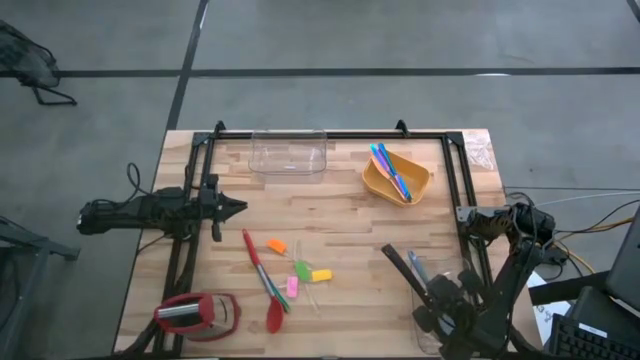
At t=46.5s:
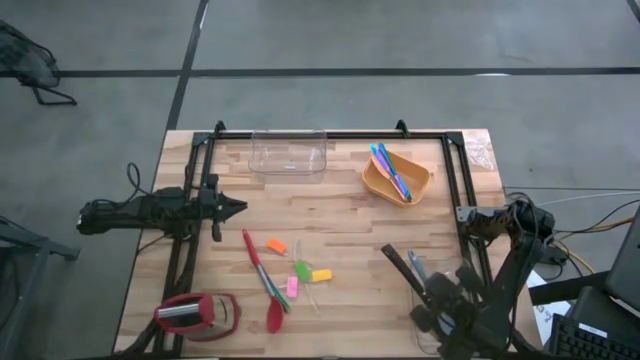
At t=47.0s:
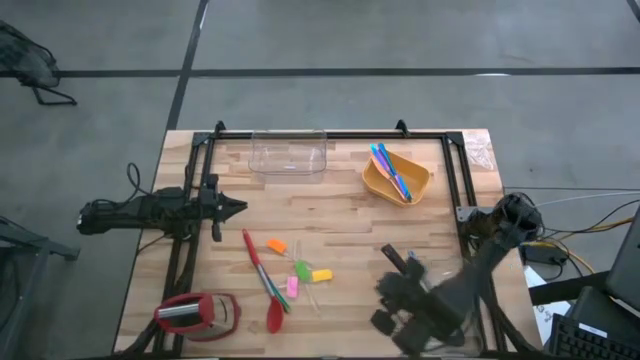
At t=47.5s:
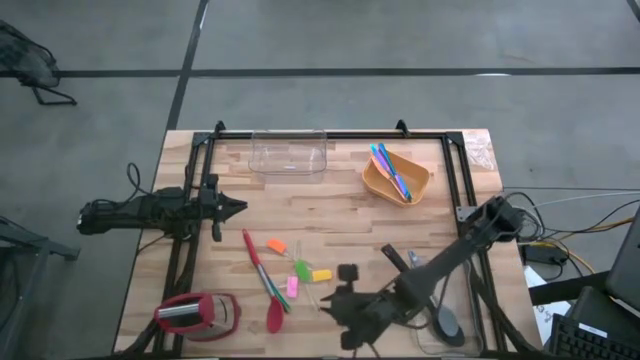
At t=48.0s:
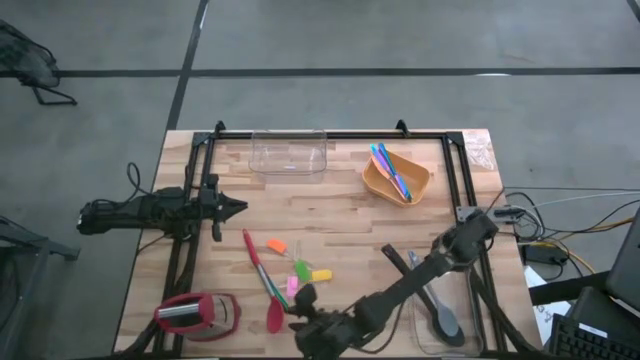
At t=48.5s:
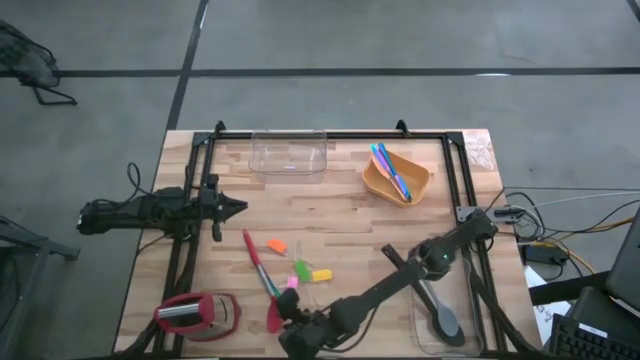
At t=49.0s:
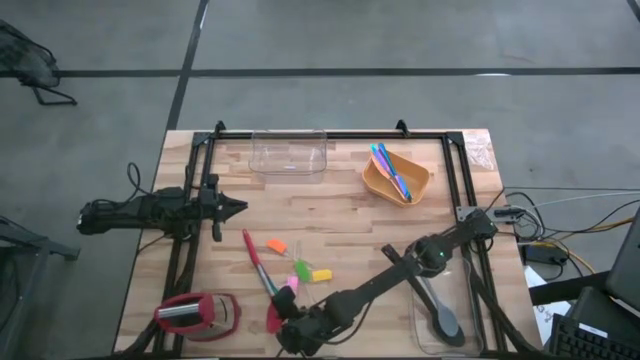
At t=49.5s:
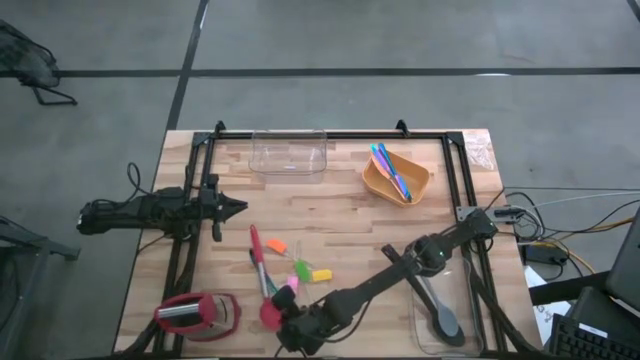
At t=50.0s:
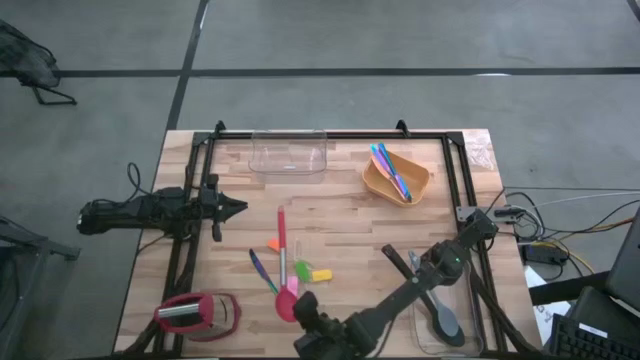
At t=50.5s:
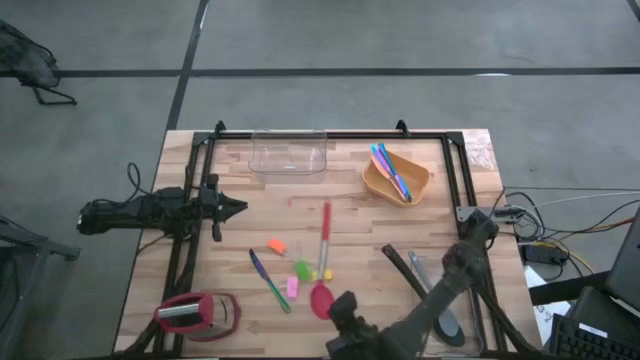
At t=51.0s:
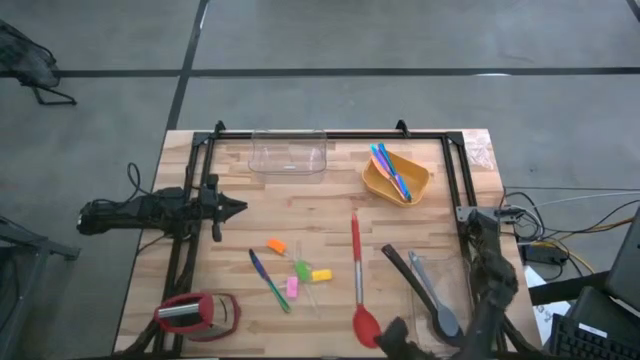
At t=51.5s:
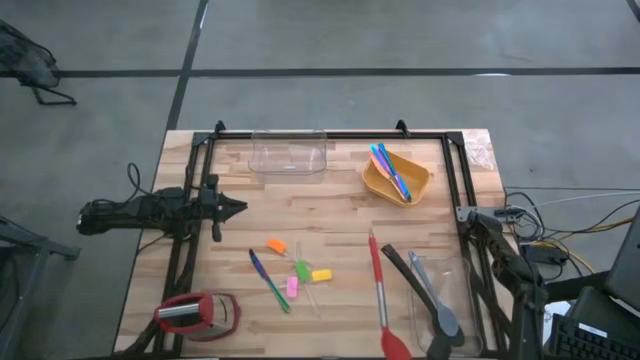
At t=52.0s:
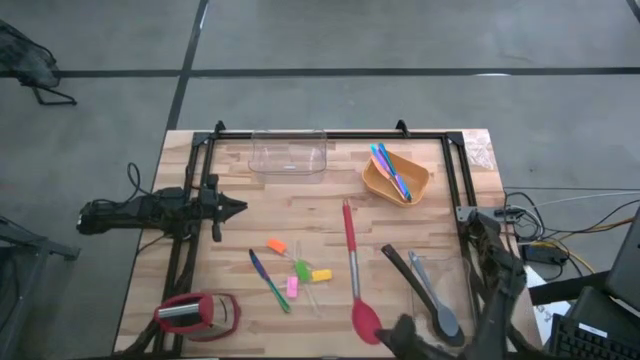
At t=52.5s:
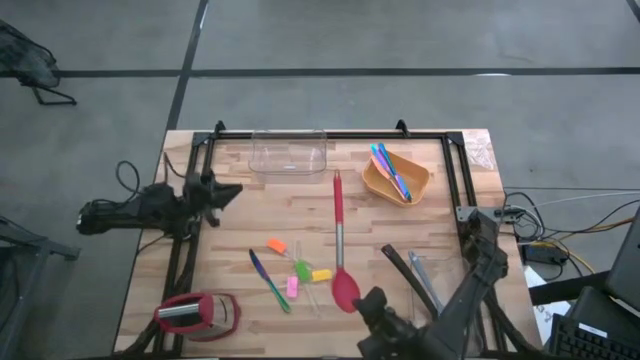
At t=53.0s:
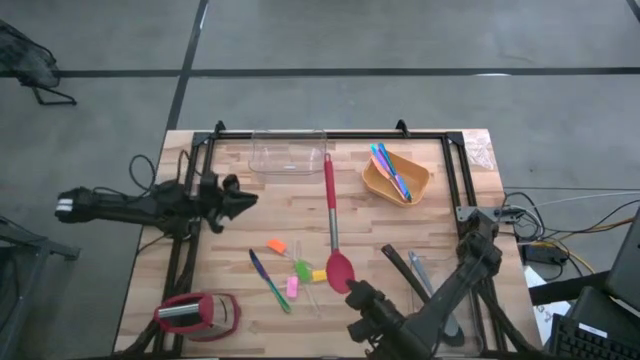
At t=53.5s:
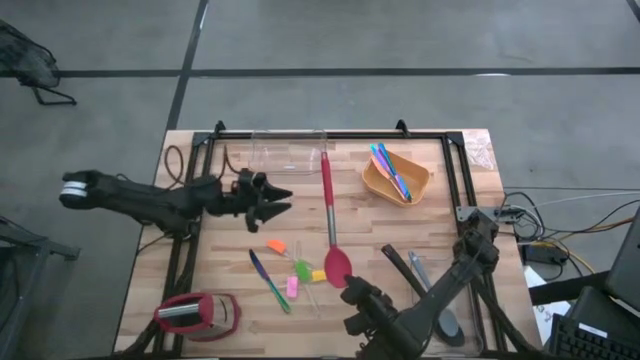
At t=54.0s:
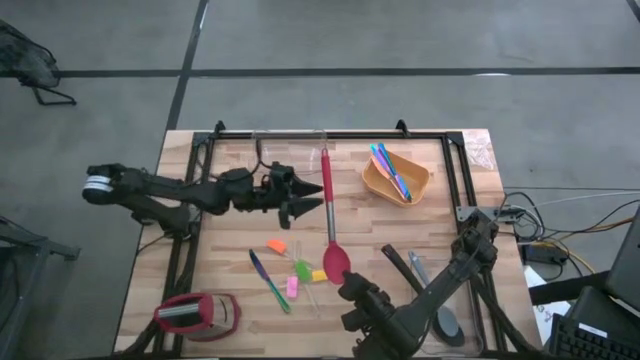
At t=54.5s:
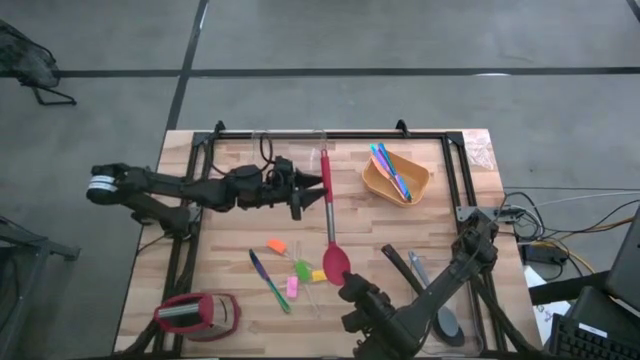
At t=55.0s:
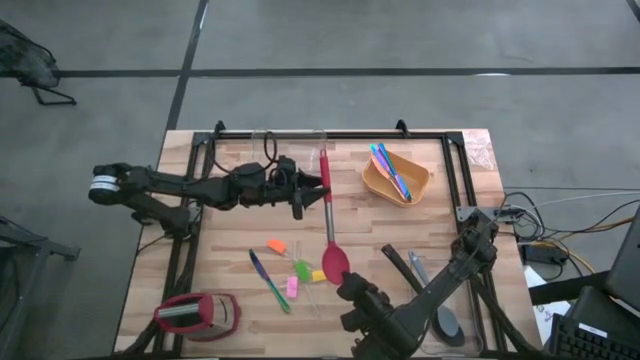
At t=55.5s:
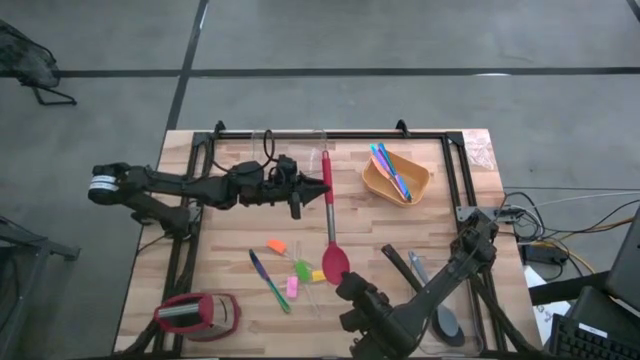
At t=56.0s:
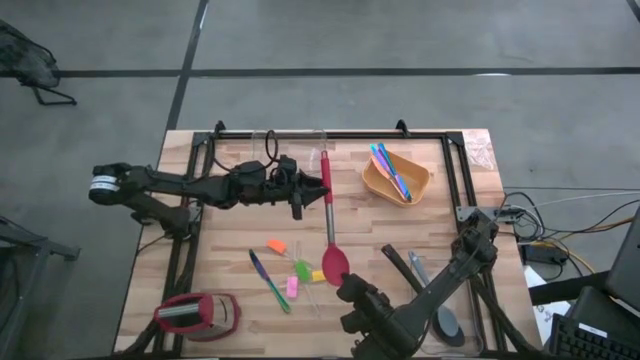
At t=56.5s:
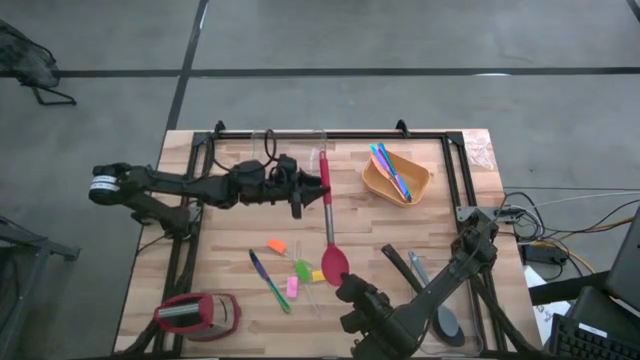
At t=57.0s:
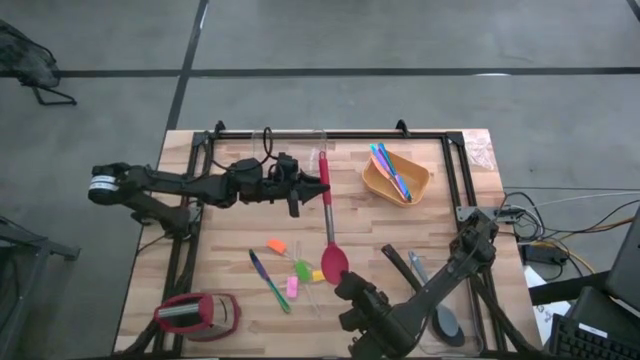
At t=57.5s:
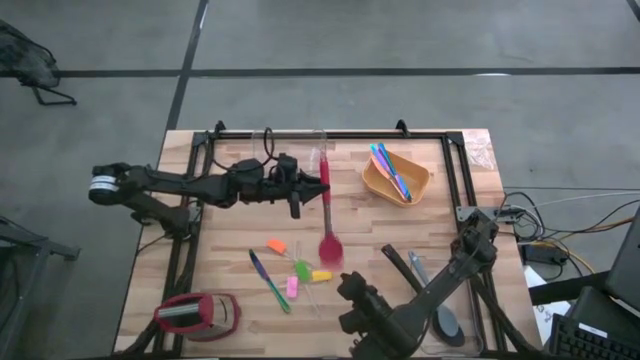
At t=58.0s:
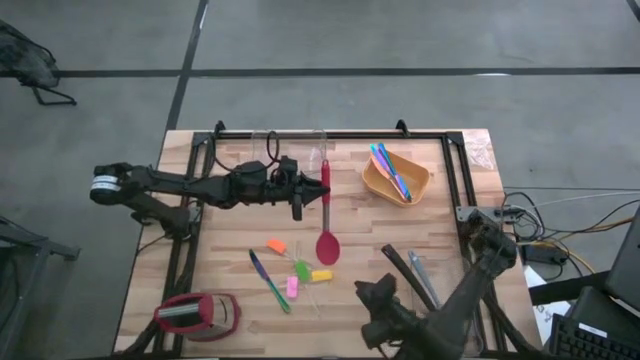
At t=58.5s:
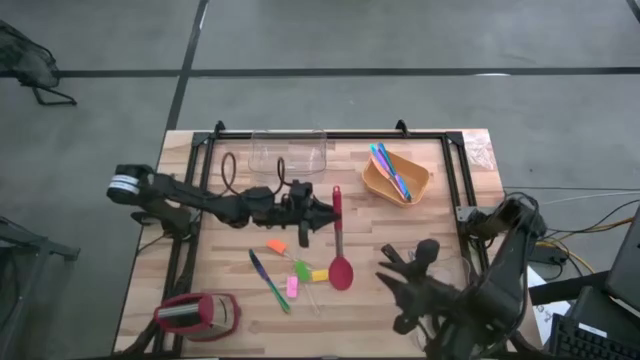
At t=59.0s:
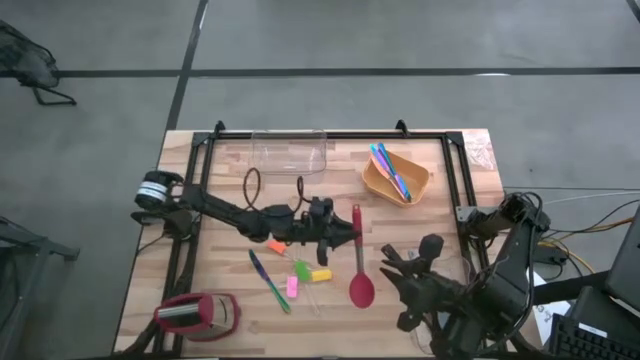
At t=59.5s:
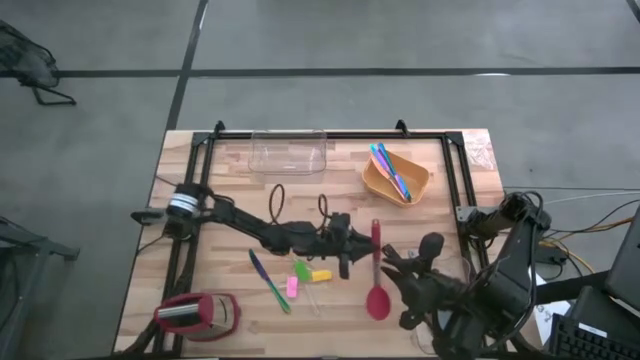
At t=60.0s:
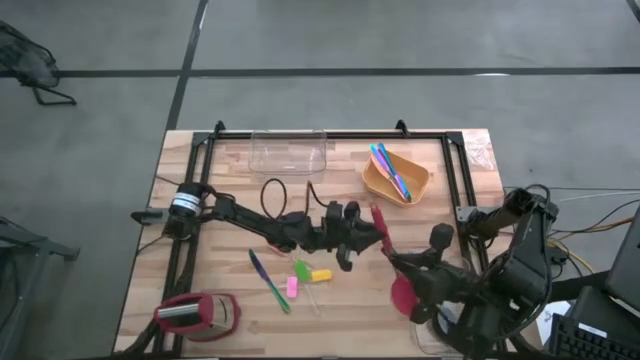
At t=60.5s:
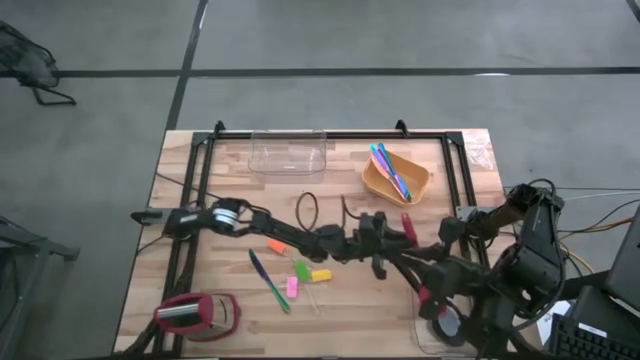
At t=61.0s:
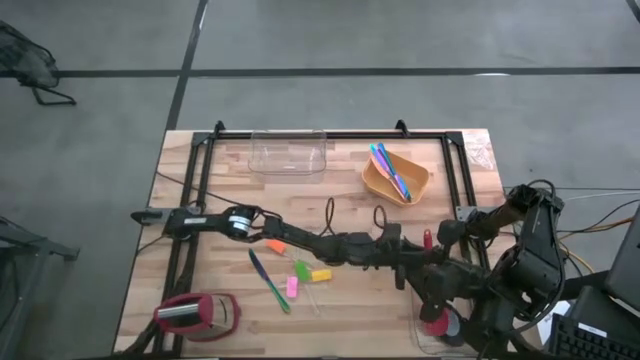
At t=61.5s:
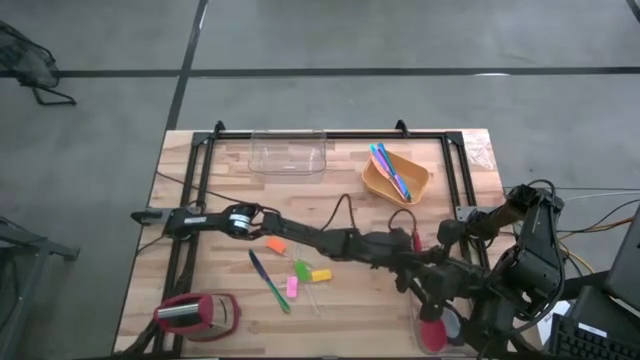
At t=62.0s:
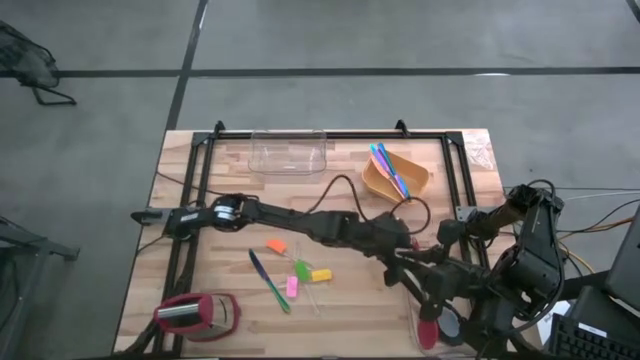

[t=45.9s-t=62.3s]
Task: Pick & Place Kitchen Items
Put the red serving spoon into the bottom transparent bin

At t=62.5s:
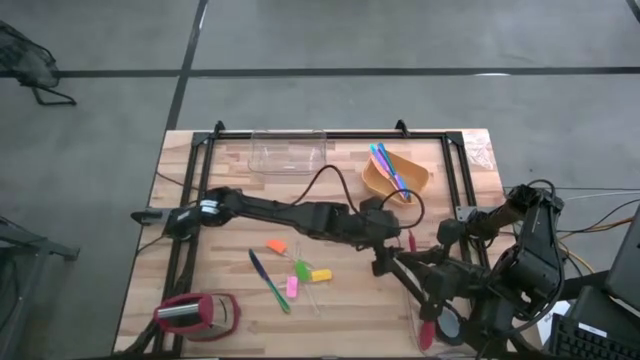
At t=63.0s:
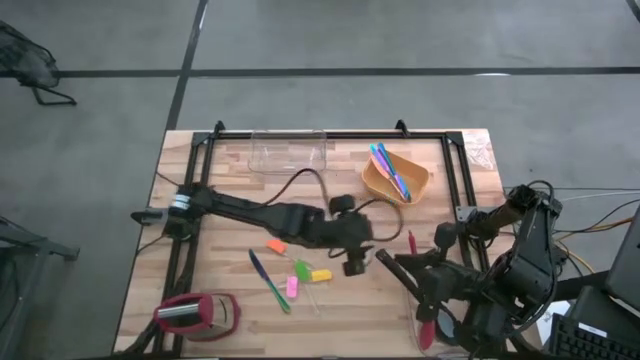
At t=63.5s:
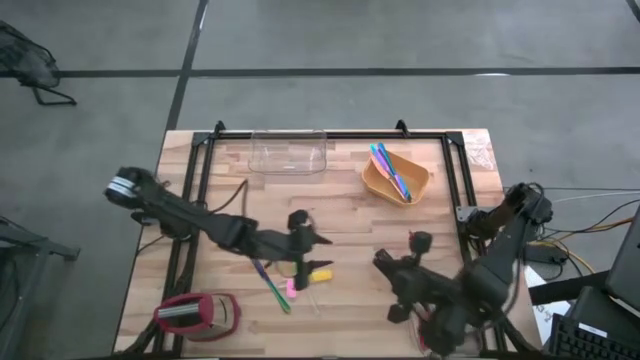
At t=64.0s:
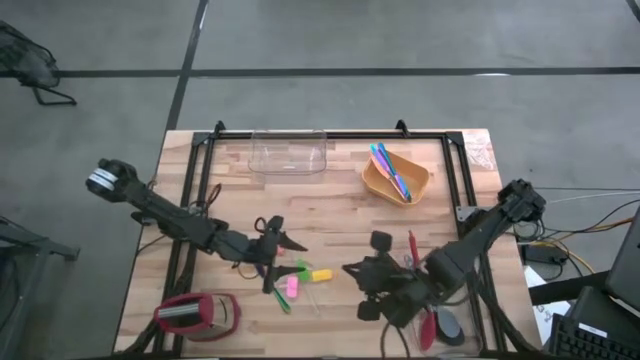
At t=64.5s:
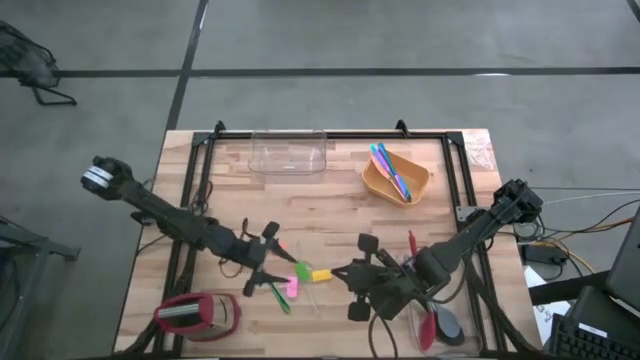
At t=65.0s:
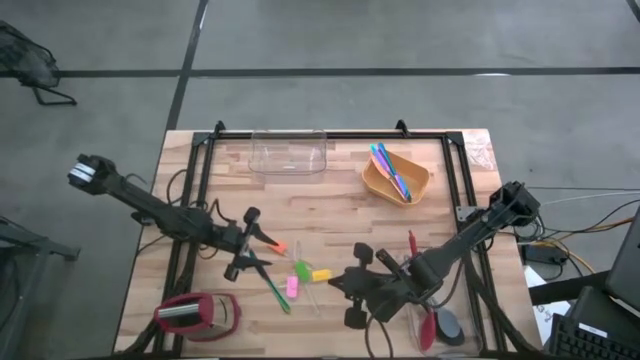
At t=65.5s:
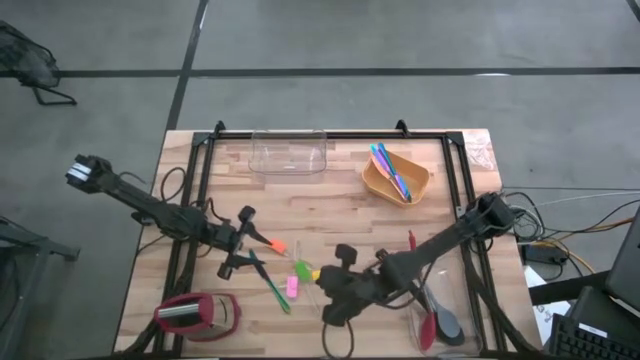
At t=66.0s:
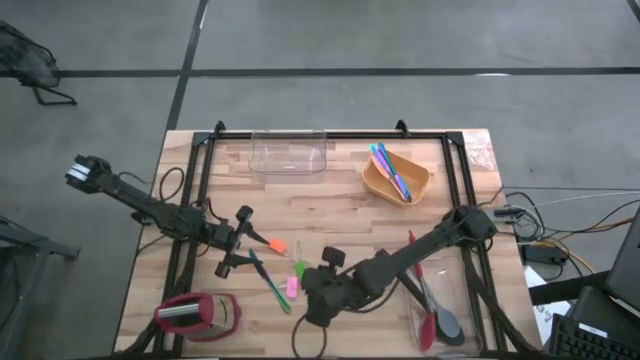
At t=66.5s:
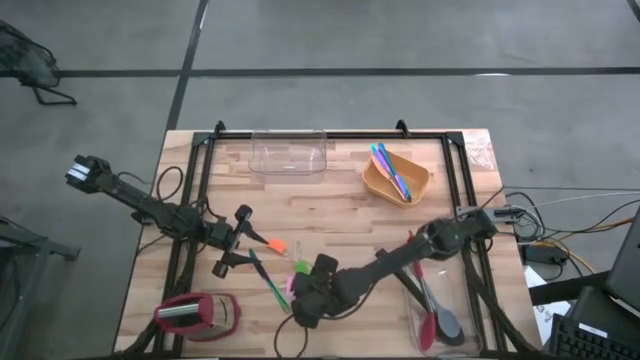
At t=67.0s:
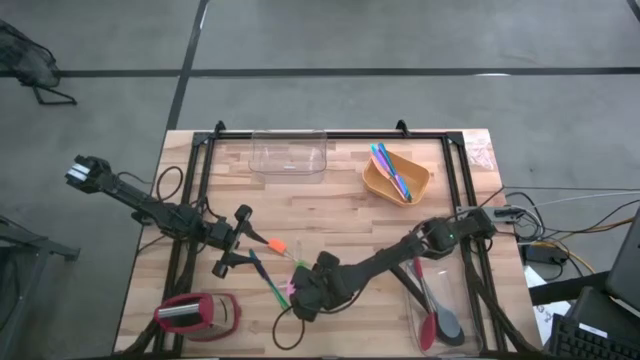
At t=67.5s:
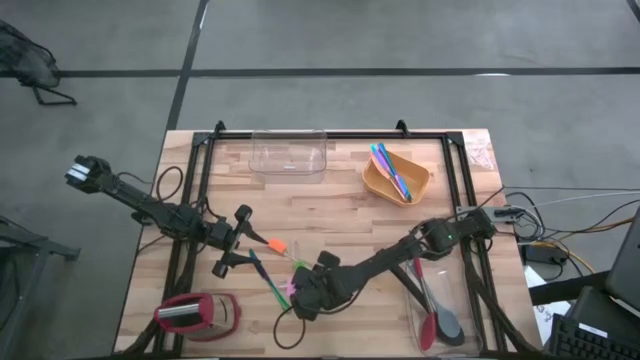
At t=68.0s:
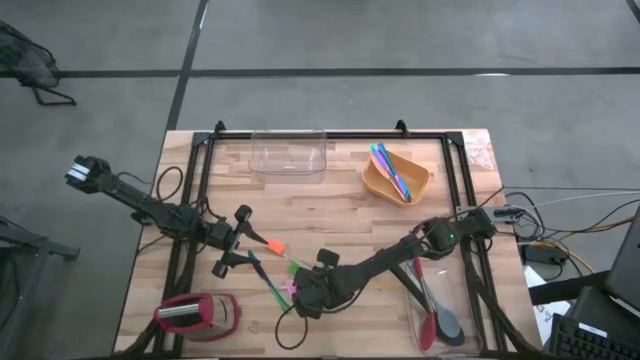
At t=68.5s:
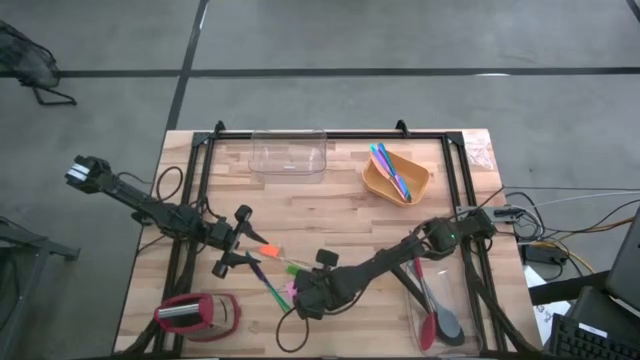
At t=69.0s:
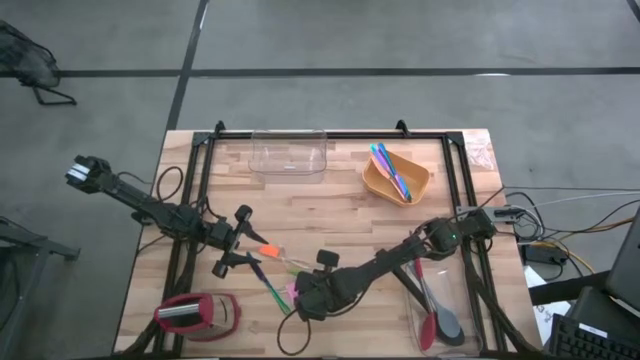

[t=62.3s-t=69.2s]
Put the green spatula into the top transparent bin
